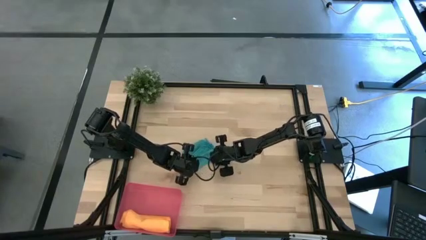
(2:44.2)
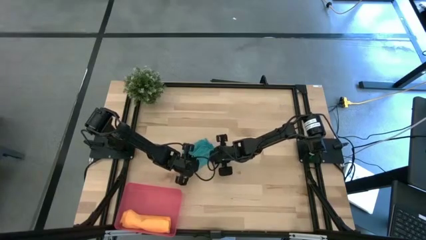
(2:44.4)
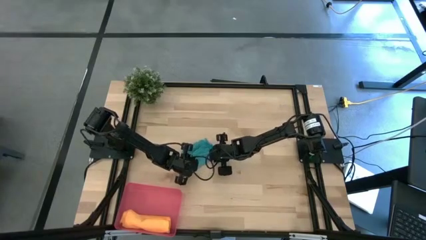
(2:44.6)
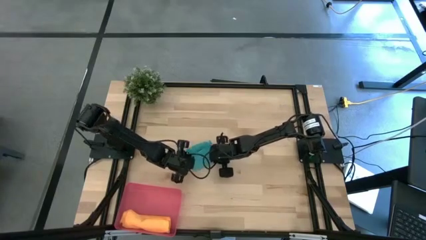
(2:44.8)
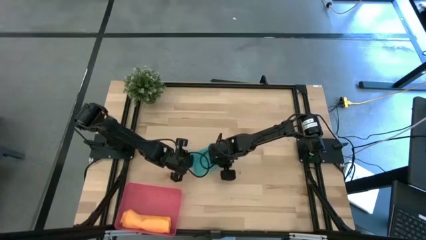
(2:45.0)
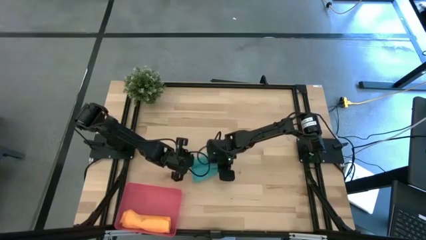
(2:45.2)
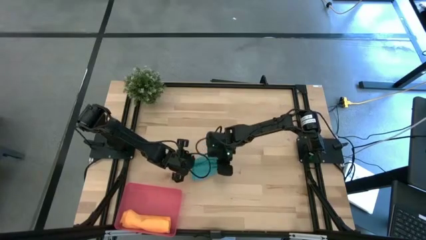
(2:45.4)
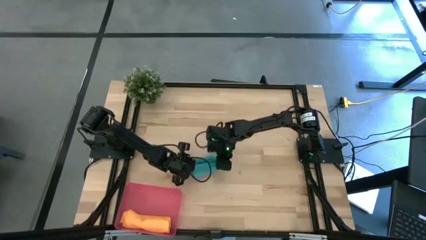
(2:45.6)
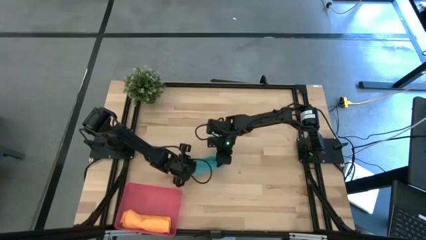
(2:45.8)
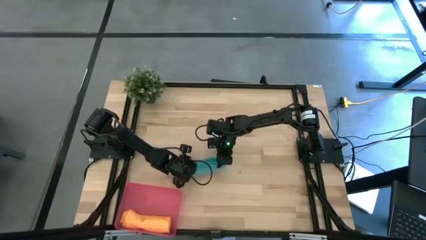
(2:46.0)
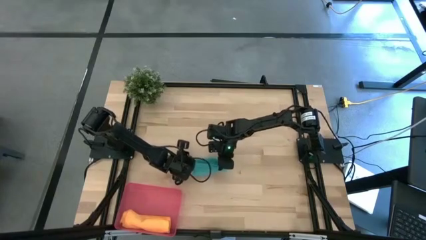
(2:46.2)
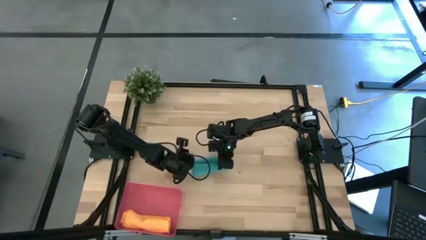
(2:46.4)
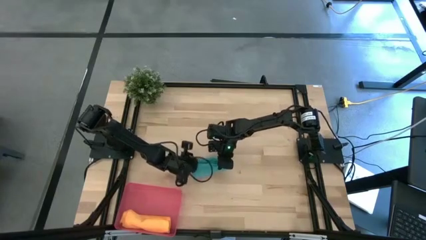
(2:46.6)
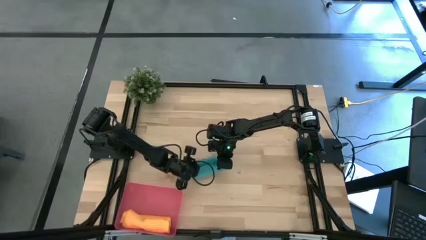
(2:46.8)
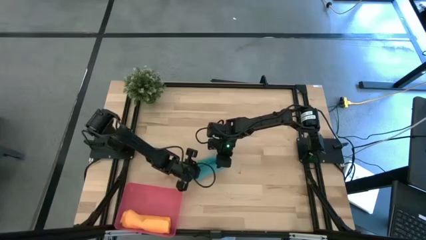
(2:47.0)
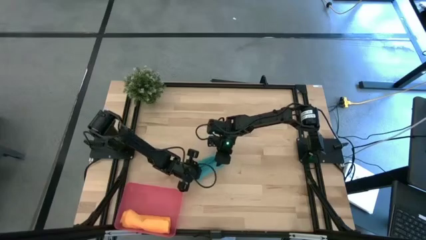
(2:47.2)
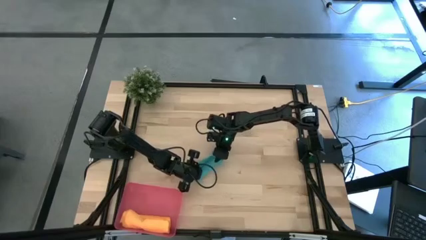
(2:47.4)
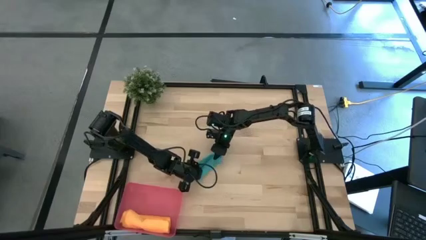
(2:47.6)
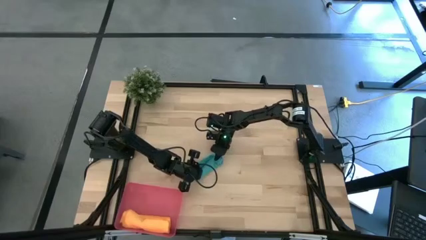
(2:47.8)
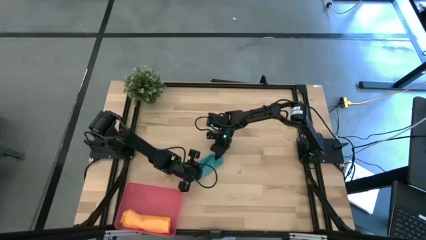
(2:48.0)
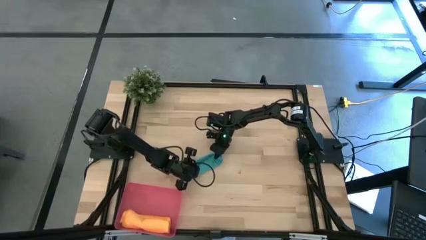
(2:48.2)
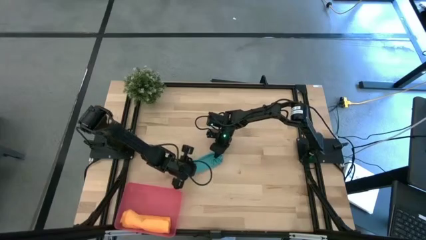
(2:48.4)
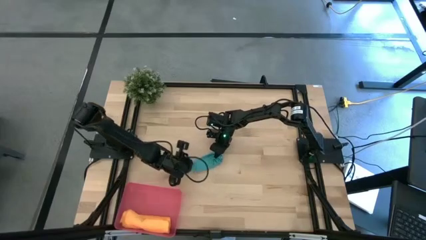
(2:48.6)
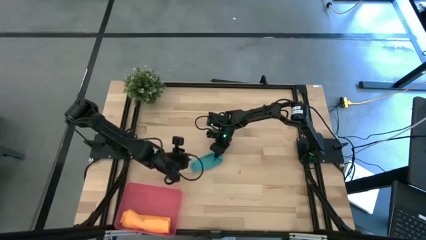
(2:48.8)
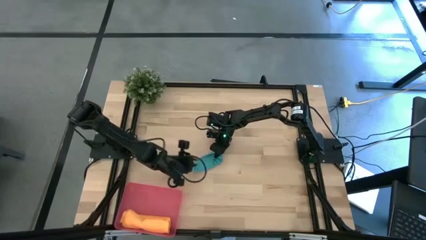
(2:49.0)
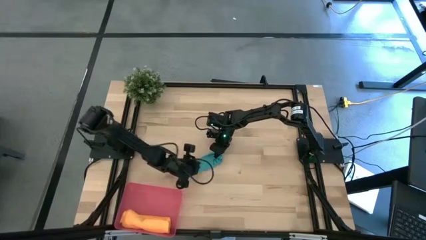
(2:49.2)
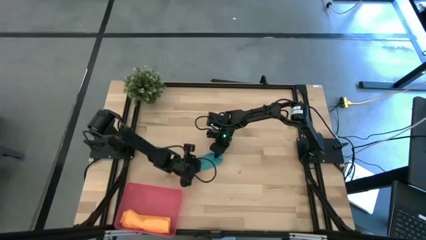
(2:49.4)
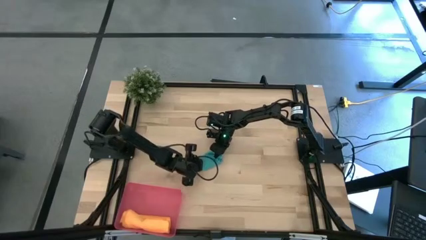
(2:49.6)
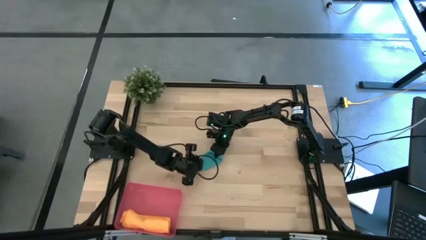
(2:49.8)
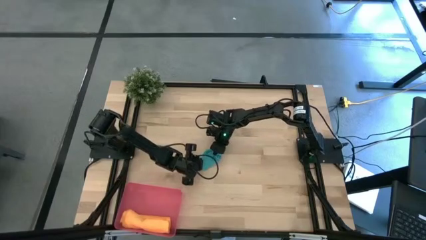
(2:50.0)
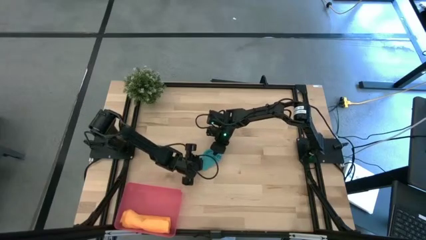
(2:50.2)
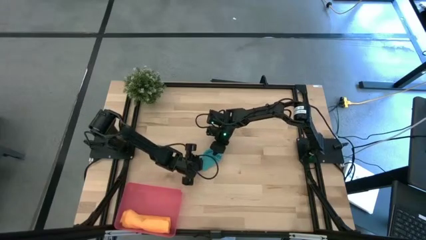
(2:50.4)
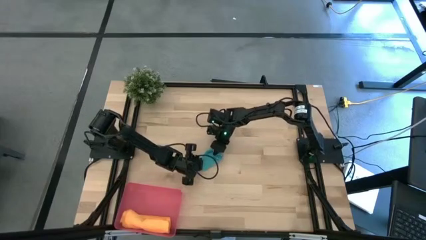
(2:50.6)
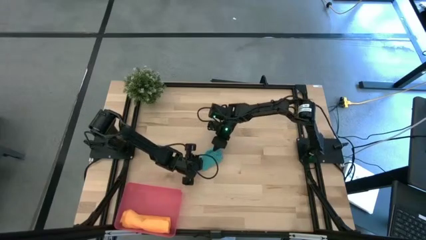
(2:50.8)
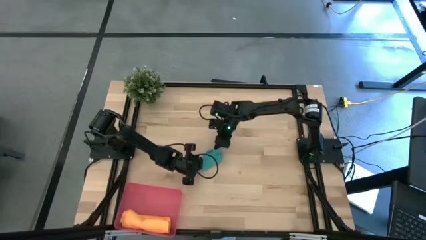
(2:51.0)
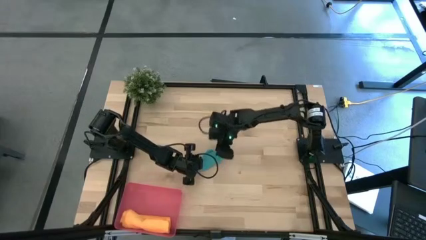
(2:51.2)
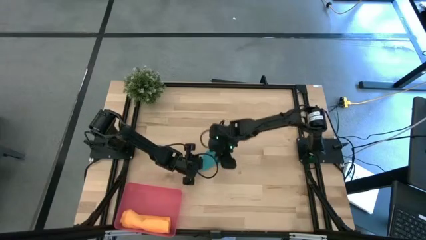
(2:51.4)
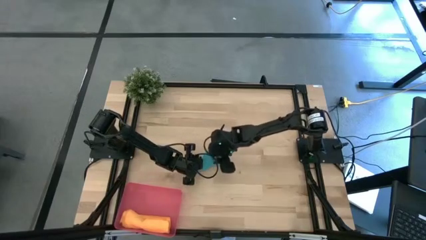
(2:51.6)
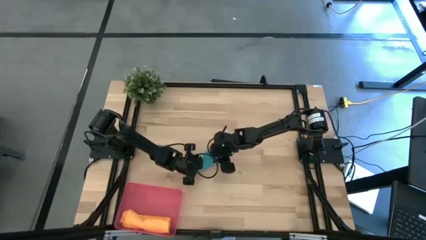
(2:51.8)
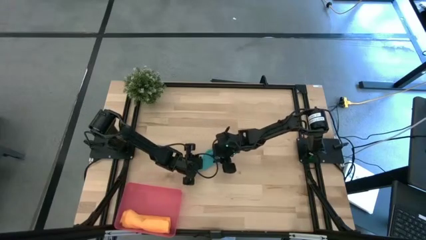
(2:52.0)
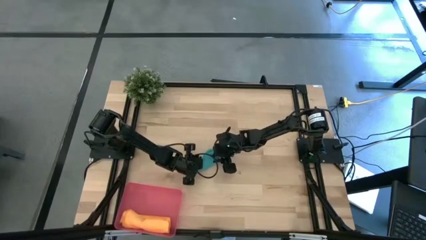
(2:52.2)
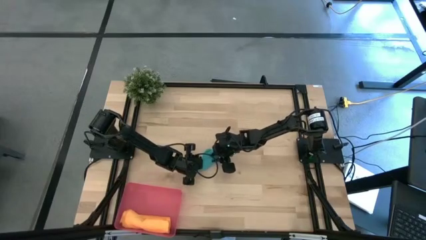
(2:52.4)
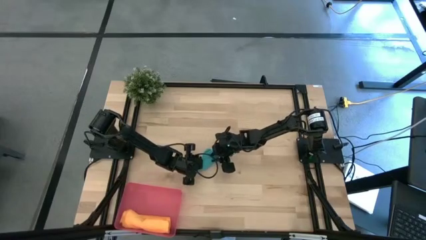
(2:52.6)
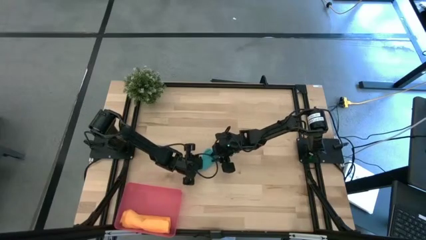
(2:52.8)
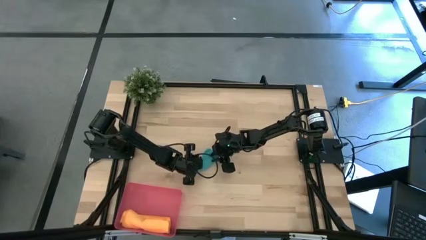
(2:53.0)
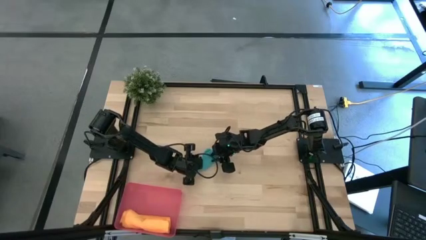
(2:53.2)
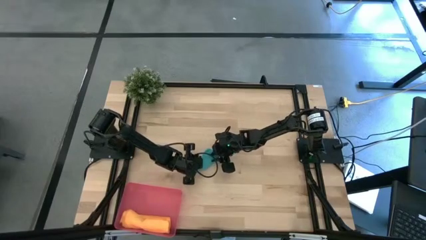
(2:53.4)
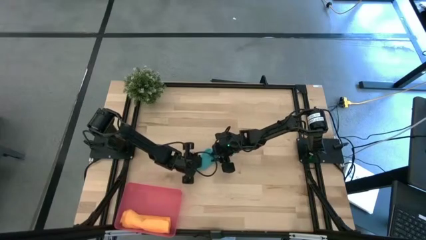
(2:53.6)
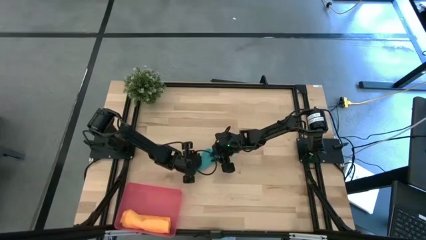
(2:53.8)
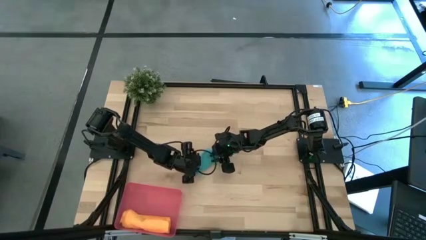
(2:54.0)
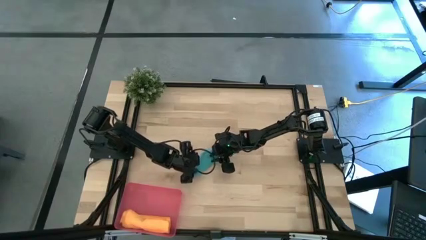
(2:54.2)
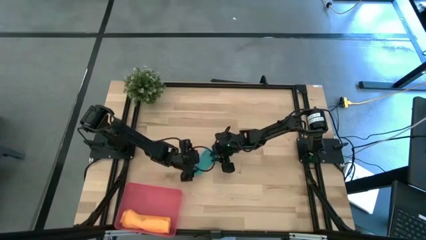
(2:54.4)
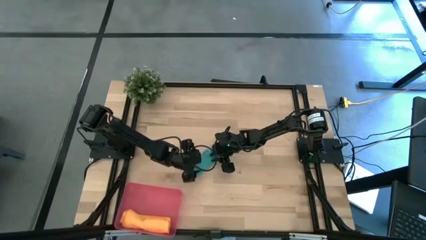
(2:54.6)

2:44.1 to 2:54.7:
Task: Roll microfiber towels into tight, uniform cylinder then place into a basket
Roll the blue microfiber cloth

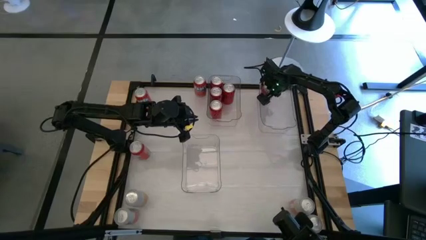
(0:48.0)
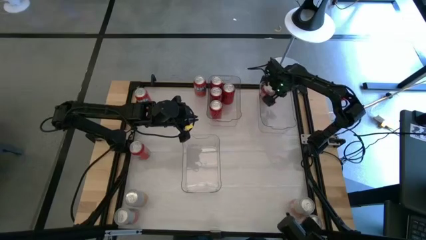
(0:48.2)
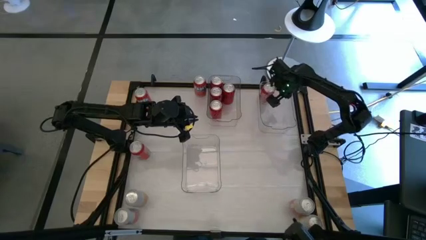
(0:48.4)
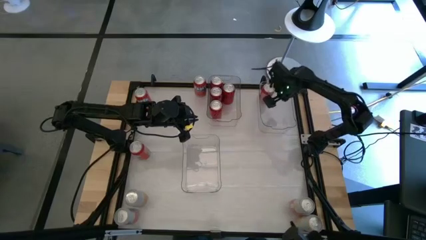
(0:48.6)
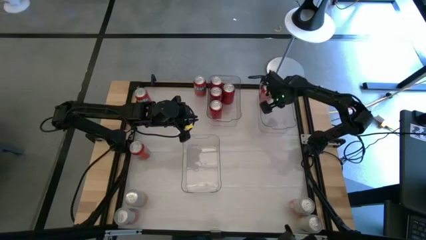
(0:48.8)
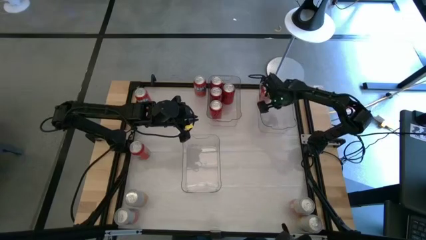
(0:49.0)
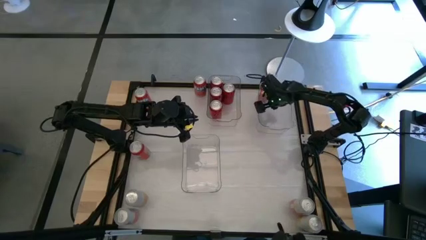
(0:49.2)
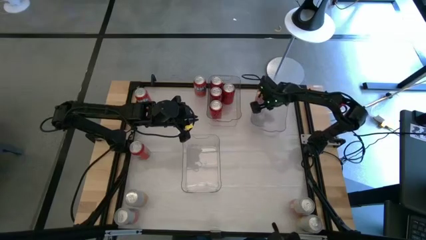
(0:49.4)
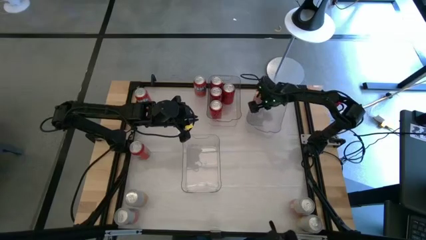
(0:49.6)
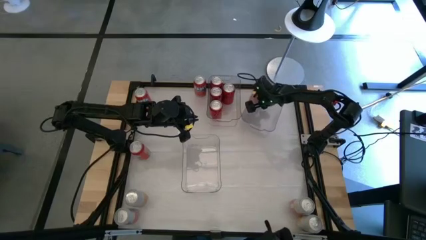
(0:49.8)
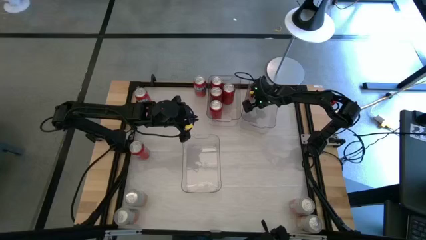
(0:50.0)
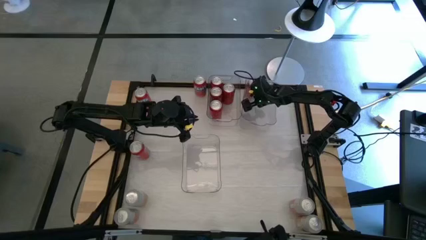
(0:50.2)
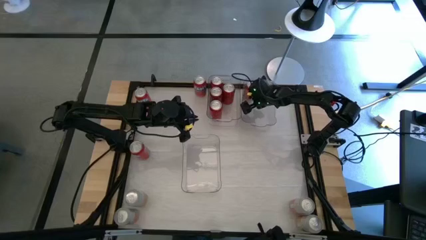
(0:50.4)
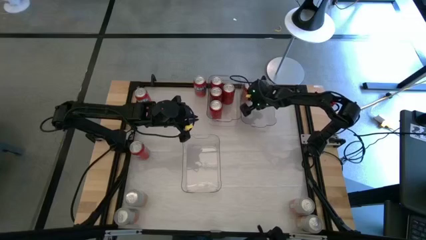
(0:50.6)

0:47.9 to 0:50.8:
Task: Sort soda cans
Adjust the top right transparent bin on the table
